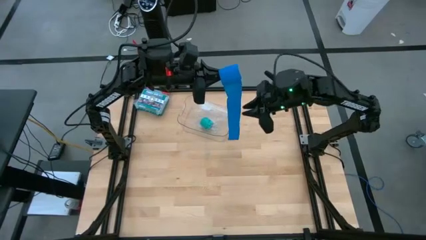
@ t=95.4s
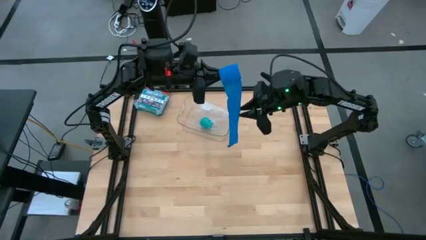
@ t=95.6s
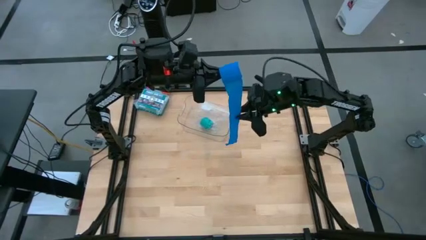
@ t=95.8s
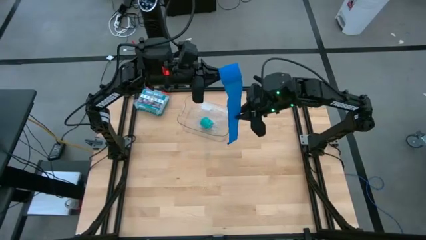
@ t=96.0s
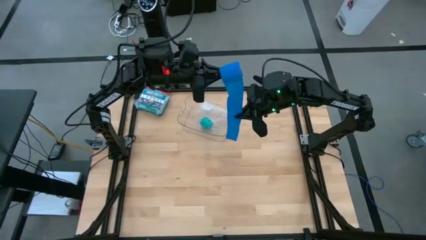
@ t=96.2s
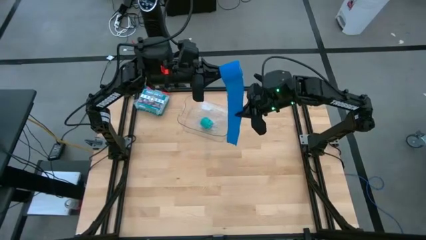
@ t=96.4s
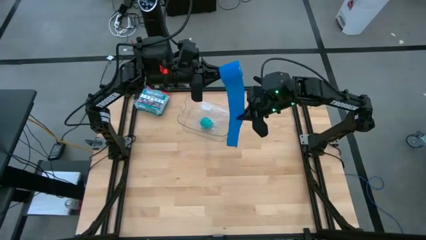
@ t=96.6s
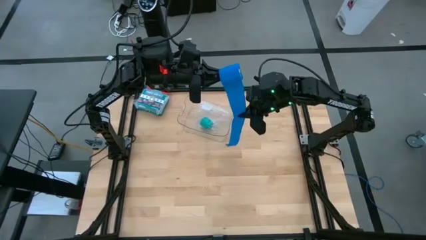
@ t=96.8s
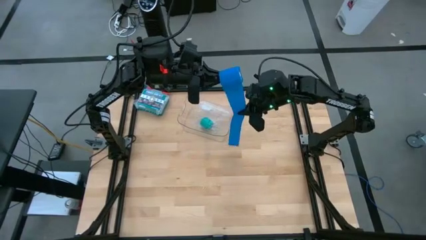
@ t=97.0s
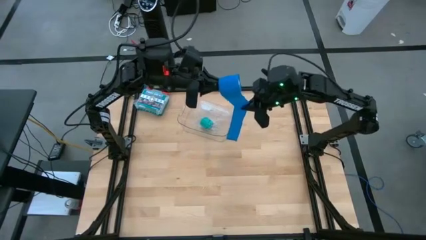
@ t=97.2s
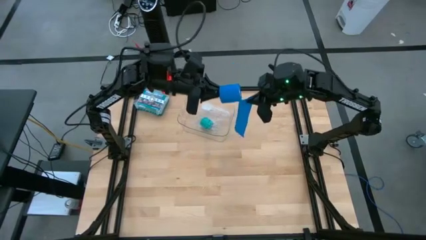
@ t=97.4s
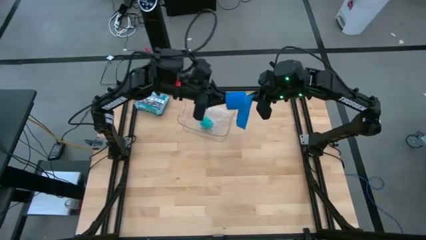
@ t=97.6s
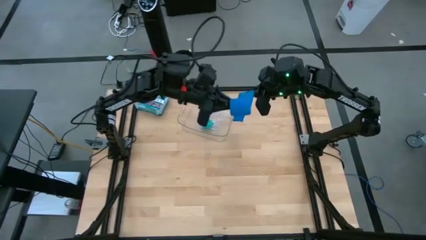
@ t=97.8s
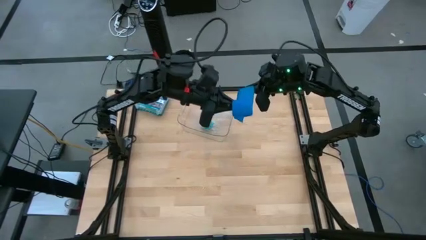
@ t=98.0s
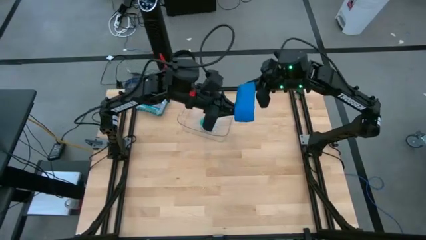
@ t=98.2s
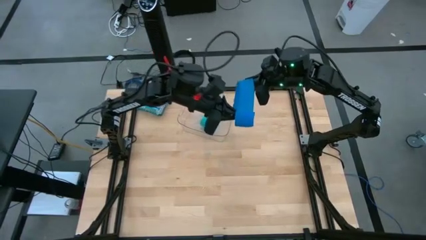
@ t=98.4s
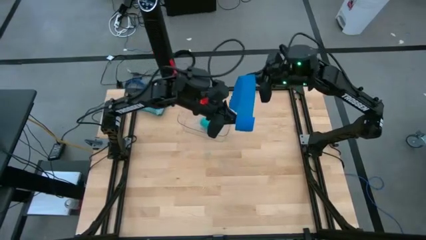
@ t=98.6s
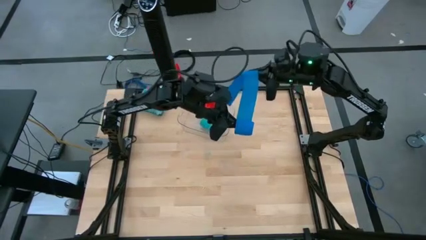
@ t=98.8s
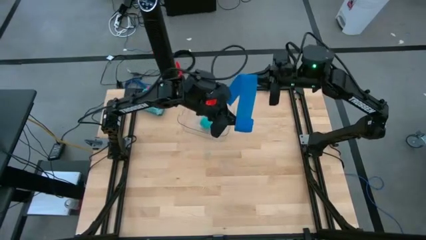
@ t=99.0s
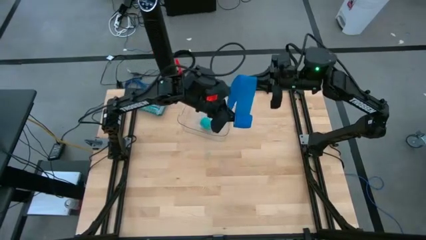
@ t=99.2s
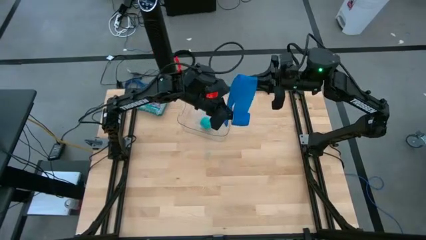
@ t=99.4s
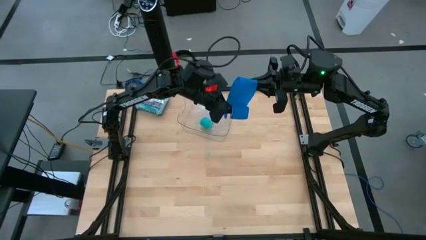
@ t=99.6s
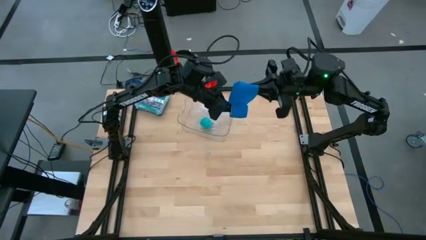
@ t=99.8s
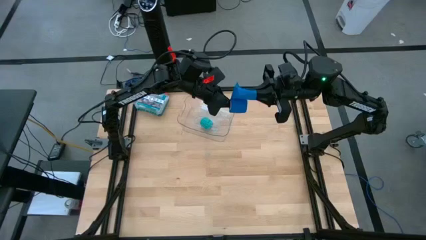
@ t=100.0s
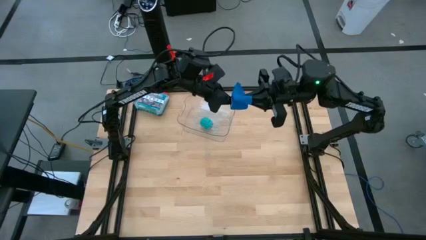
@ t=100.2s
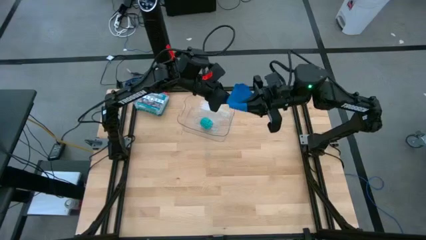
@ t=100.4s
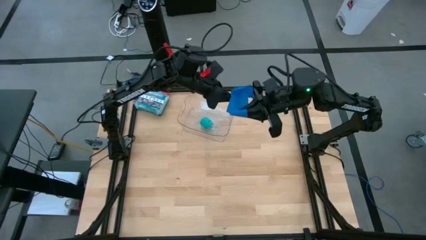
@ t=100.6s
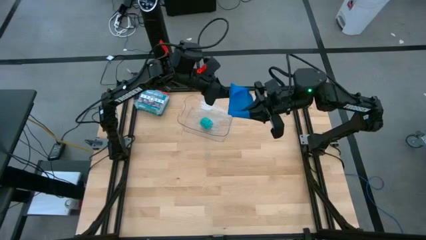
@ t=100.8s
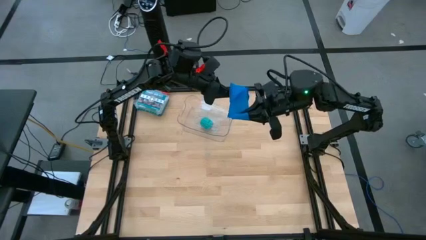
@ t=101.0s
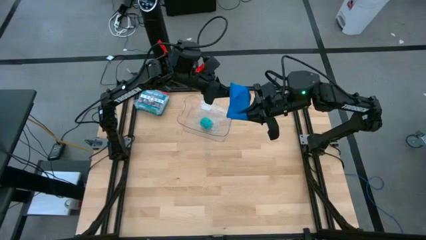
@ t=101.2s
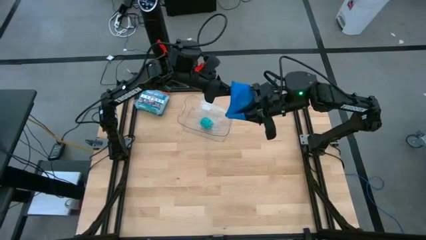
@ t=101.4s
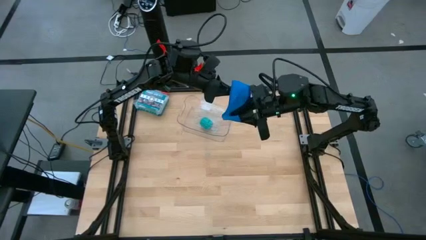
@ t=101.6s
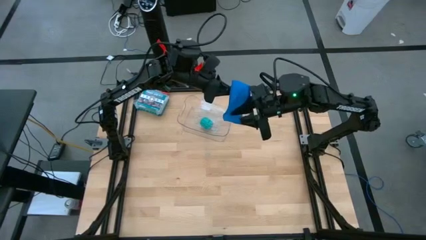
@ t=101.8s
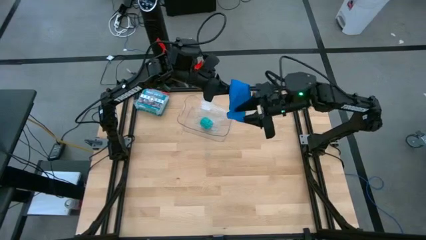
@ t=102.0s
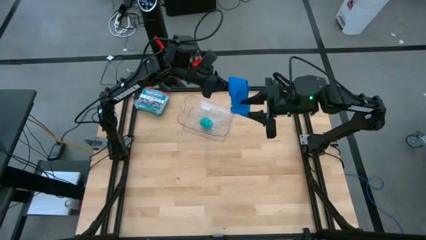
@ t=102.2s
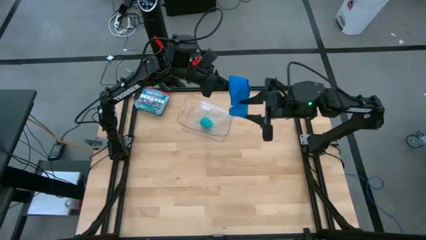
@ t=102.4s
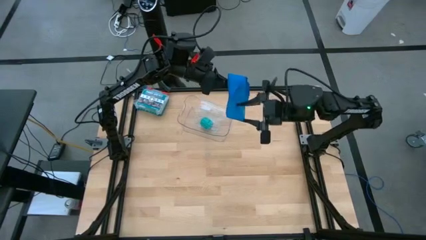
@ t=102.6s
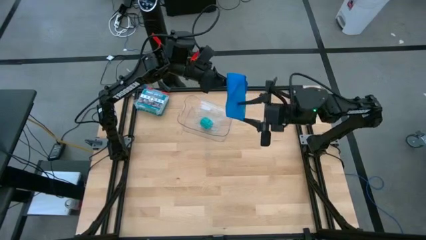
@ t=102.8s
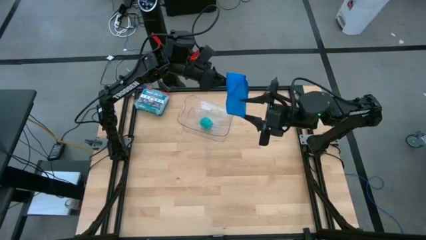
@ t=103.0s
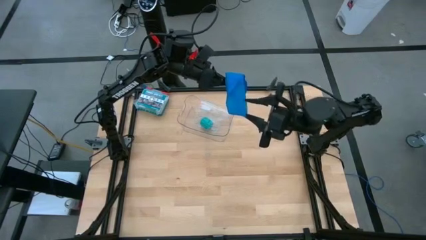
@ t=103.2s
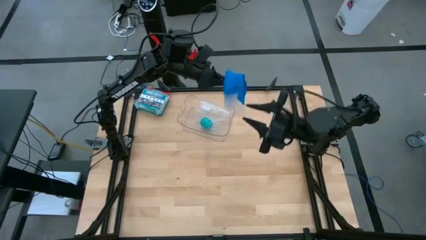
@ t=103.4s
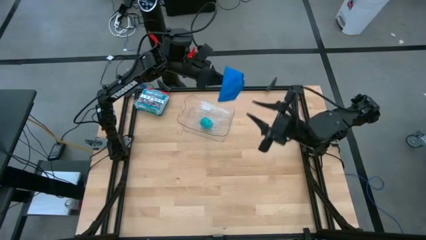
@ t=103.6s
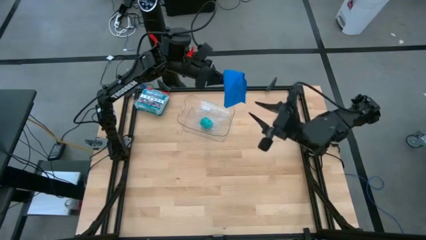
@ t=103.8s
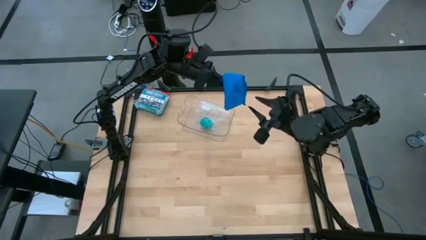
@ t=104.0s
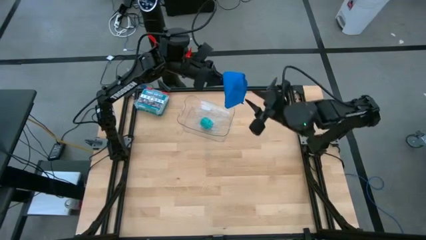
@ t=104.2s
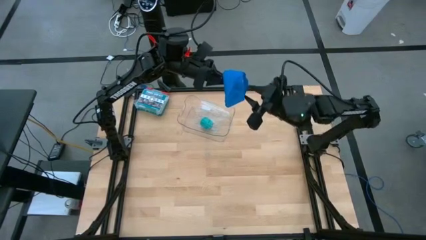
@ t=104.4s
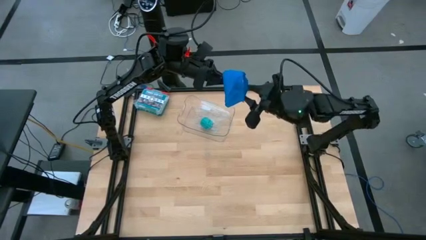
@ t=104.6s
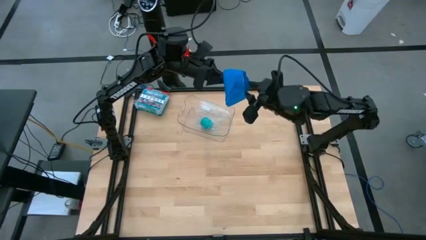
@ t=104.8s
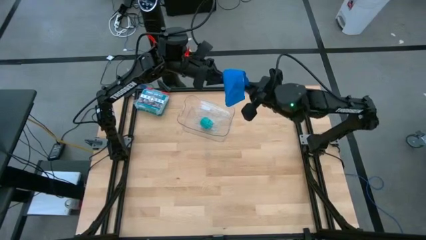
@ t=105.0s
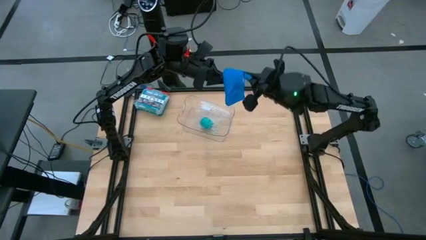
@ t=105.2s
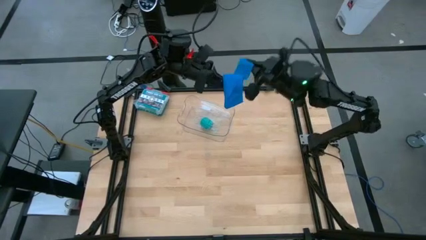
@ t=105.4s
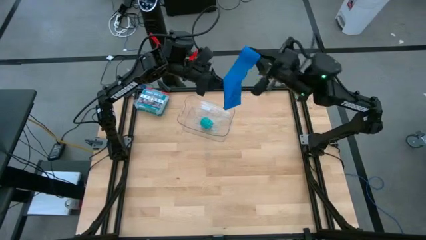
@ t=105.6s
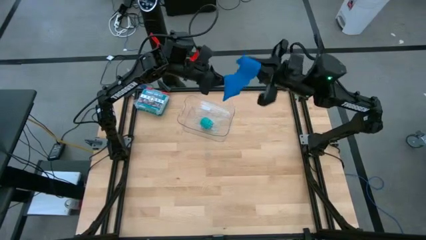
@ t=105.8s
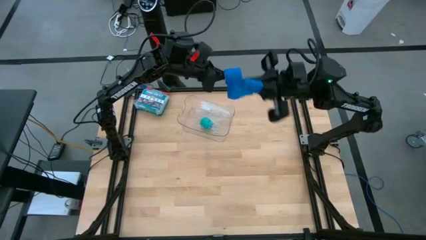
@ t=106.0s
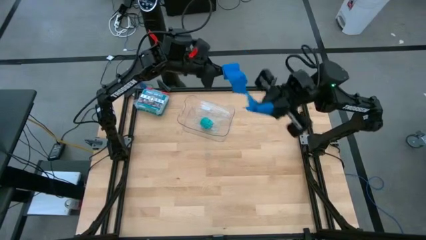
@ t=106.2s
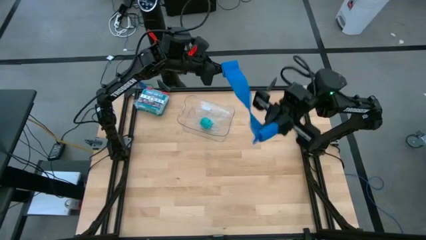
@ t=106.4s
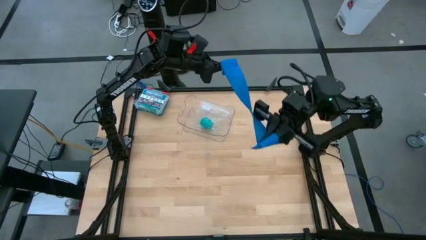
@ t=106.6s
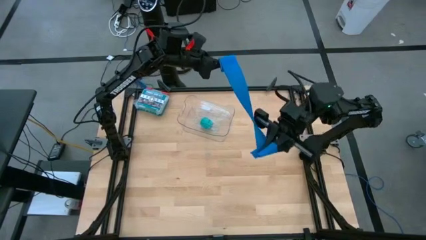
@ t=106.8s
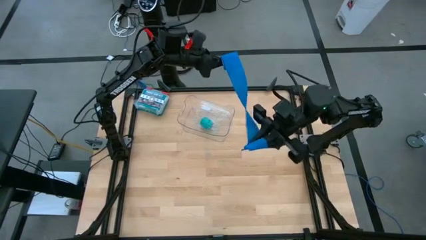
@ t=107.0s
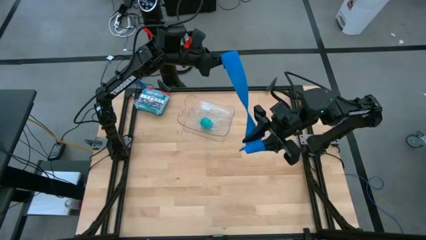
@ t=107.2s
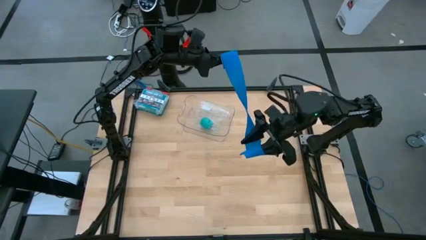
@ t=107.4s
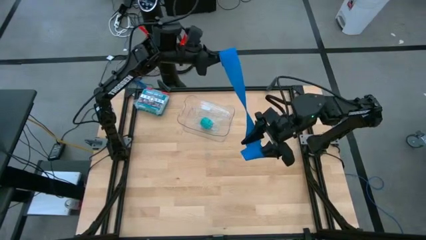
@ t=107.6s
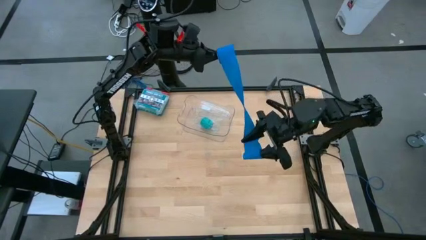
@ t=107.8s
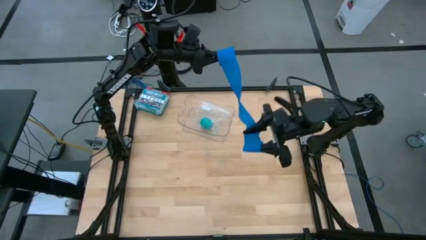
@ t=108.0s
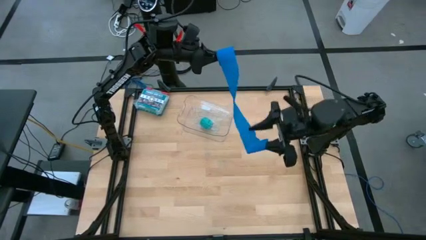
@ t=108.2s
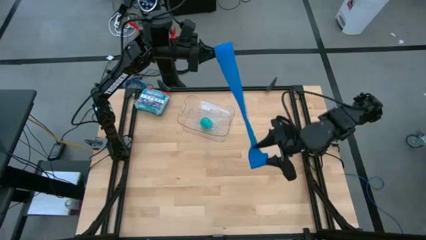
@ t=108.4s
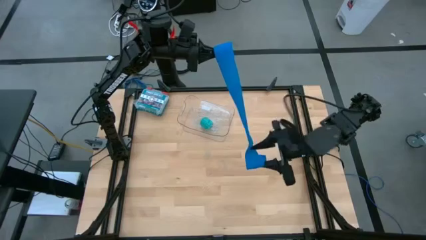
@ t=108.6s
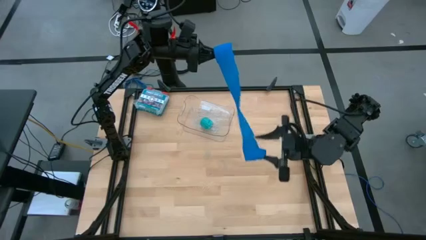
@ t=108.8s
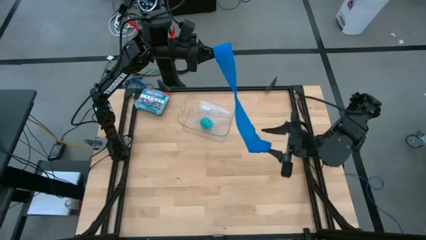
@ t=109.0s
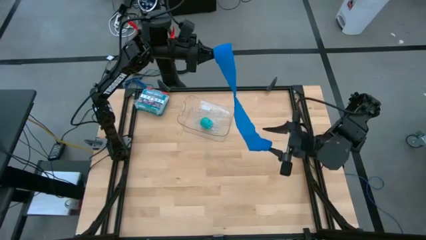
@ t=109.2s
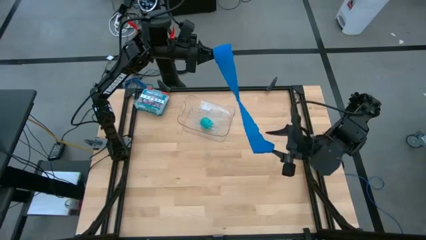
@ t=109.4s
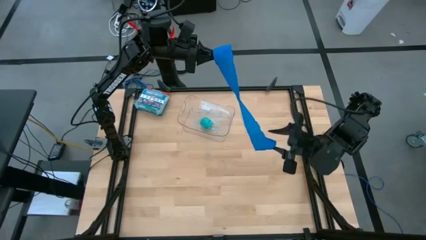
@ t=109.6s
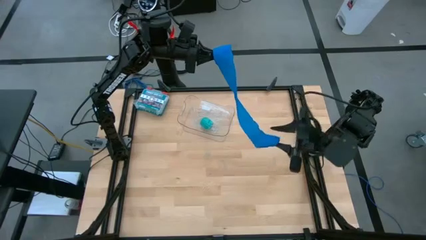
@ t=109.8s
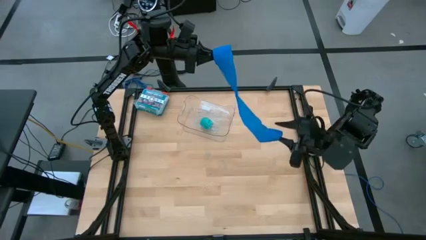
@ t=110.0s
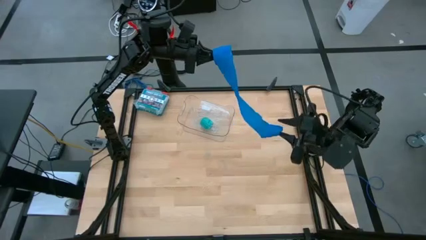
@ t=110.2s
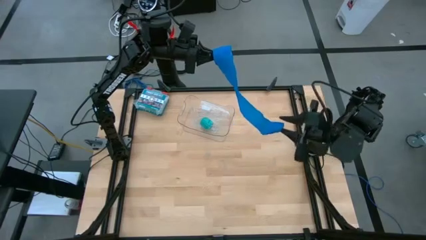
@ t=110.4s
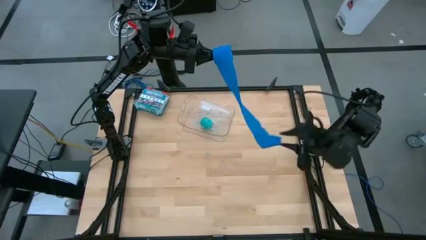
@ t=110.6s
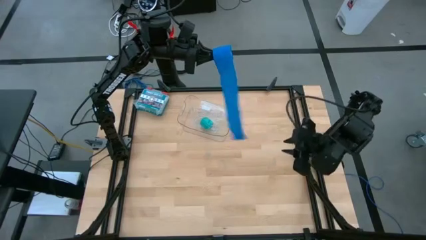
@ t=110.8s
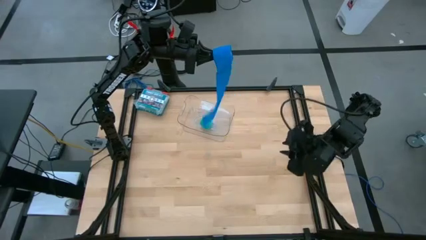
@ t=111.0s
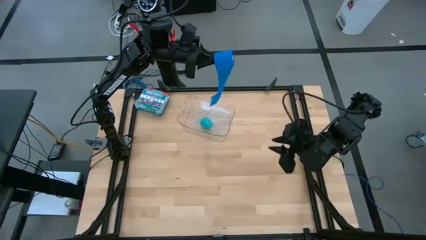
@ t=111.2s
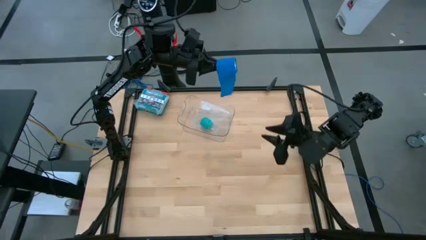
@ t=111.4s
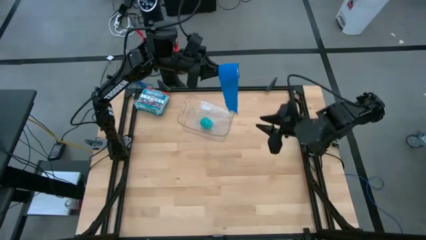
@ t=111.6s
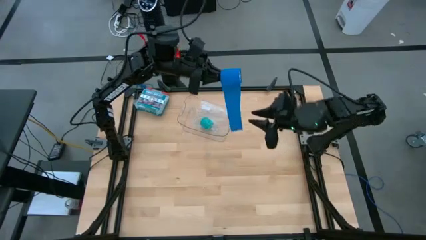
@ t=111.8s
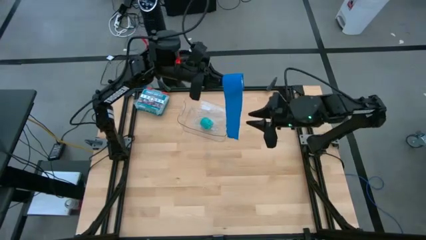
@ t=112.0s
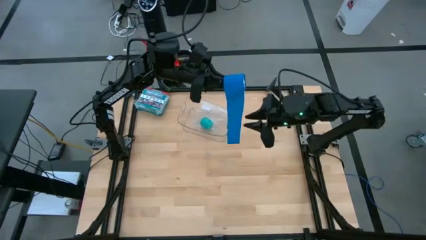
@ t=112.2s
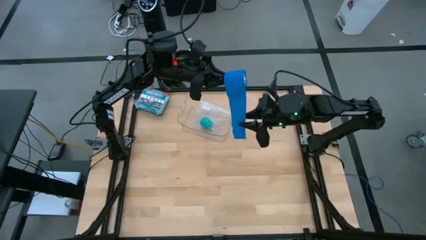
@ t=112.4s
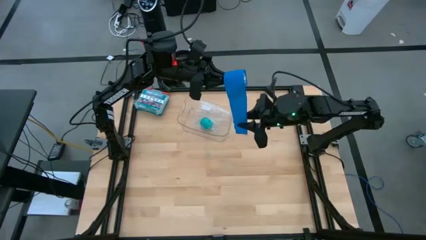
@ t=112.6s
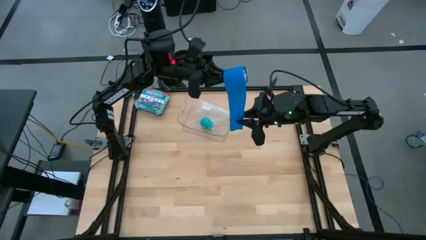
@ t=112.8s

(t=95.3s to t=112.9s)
Task: Roll bandage
Roll the blue bandage
